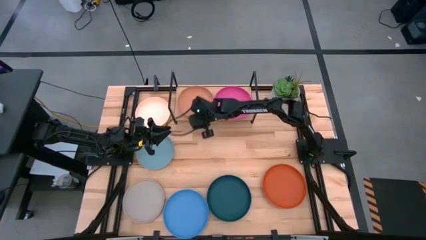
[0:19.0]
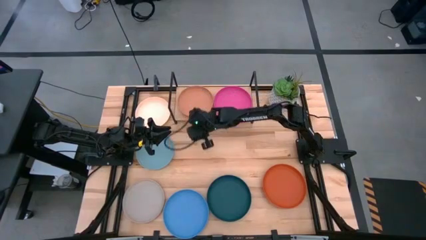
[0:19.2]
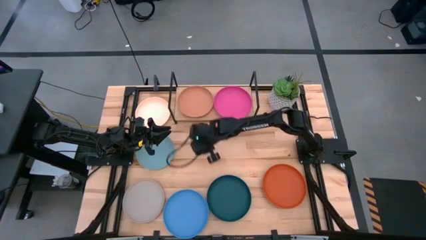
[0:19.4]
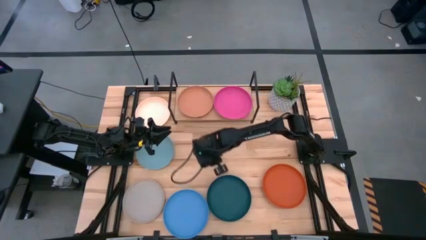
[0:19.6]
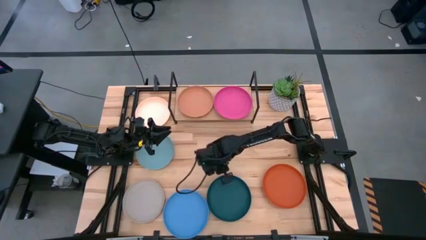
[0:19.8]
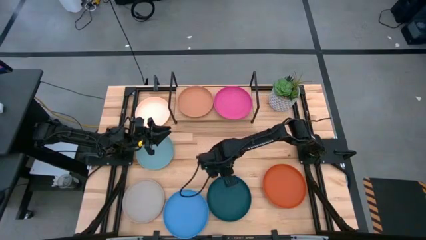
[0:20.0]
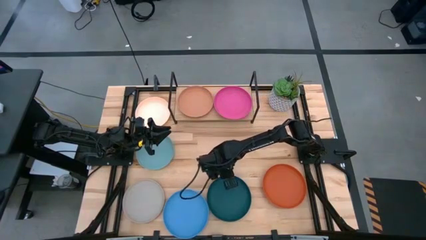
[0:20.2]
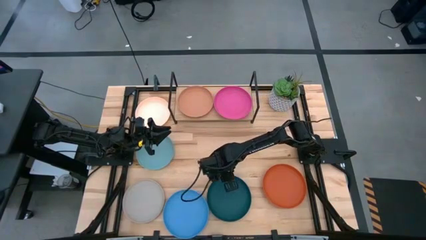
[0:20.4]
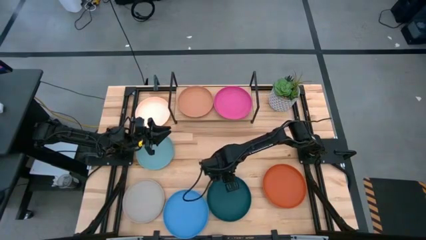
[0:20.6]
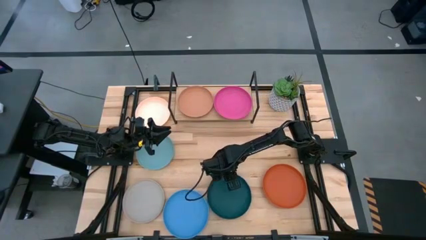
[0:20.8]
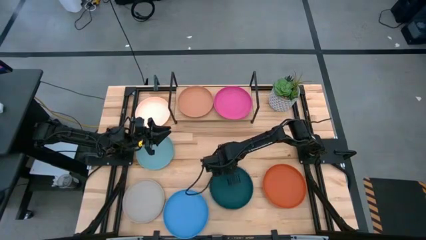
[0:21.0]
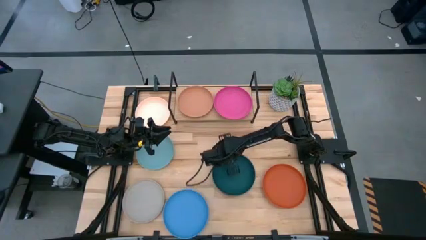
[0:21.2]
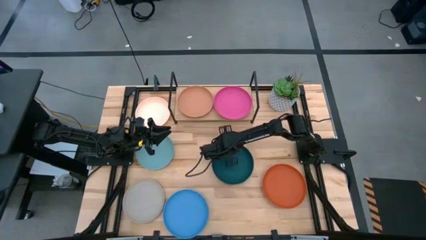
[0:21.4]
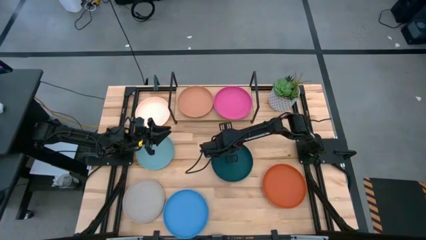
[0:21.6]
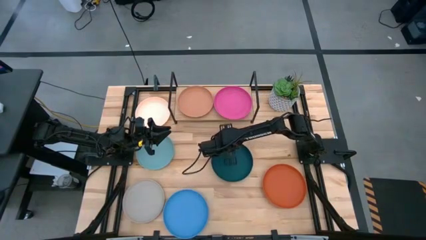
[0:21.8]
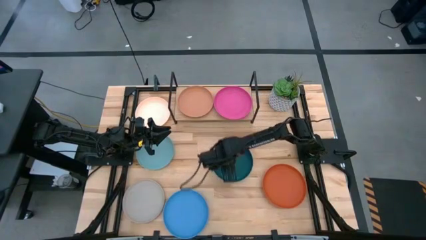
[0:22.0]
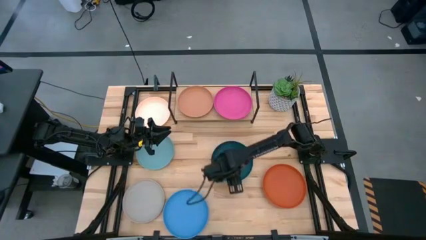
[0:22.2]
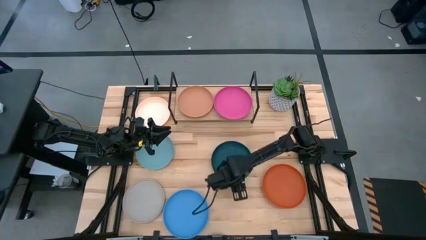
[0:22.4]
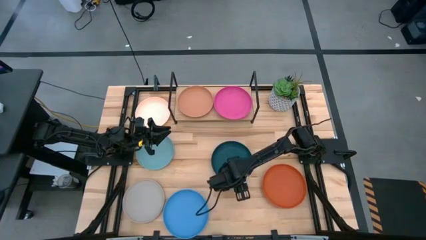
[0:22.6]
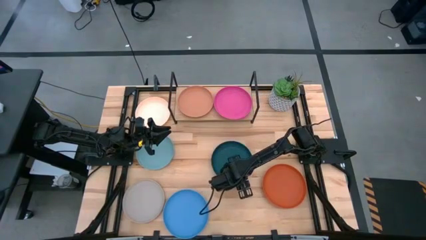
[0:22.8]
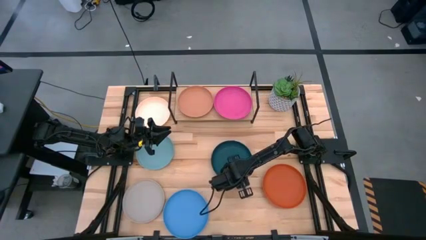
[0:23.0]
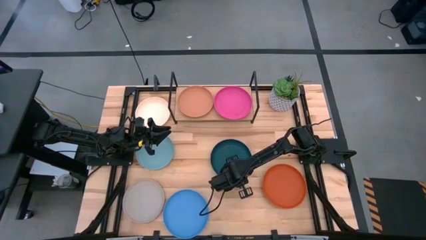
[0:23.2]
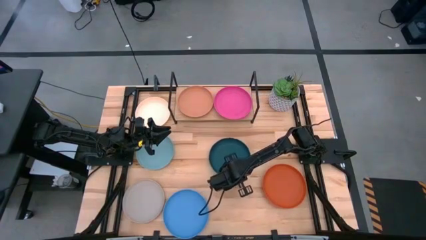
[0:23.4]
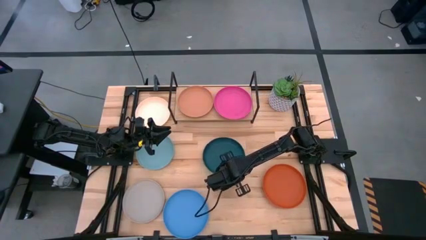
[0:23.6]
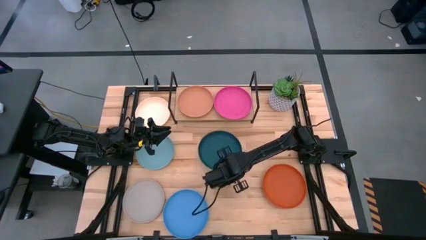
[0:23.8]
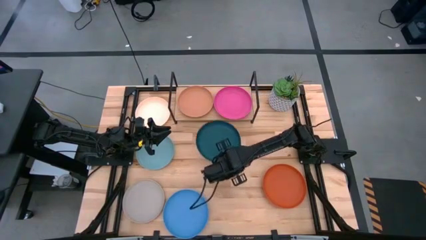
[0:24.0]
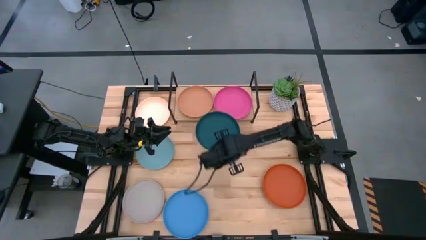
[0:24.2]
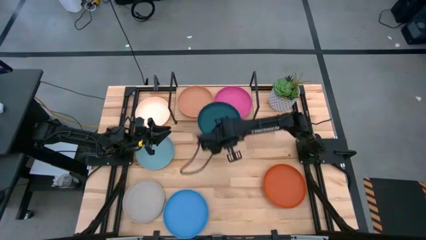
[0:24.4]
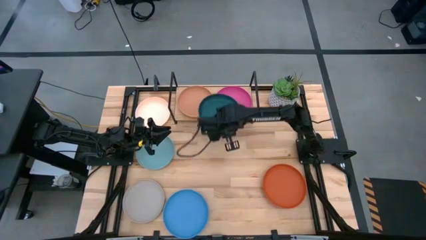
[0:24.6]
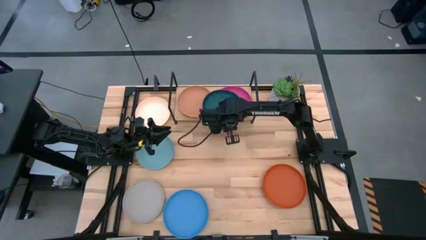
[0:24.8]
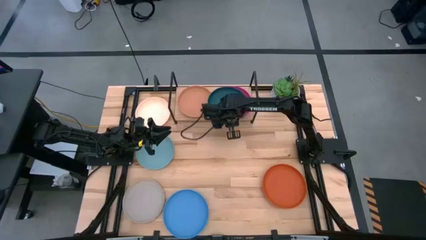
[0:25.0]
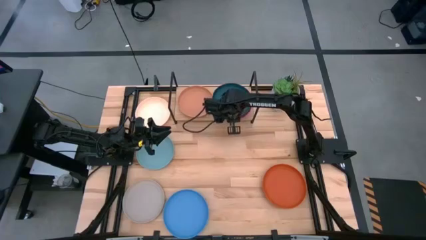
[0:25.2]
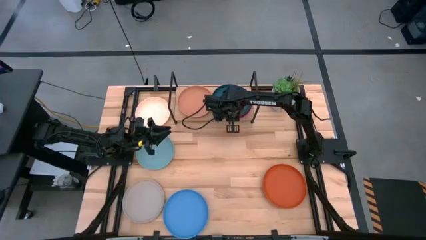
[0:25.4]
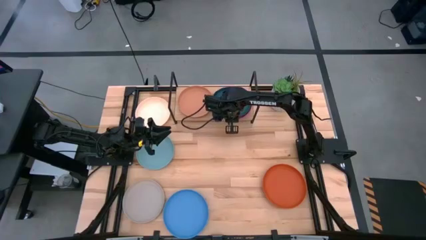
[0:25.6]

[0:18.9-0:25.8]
Task: Place and stack plates onto a shelf
Stack the dark green plate on top of the pink plate on the shelf

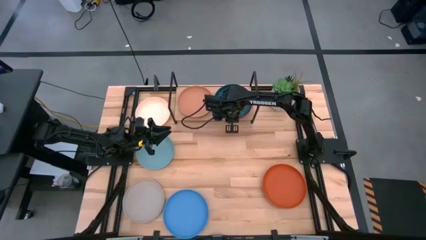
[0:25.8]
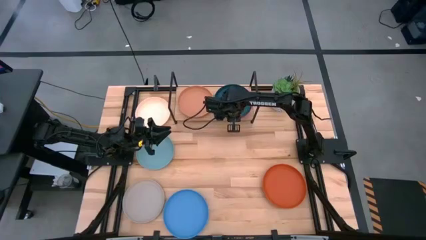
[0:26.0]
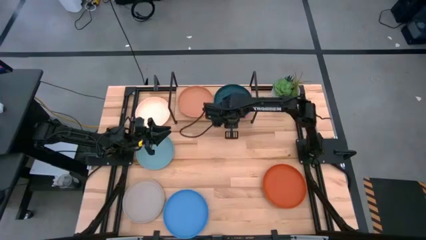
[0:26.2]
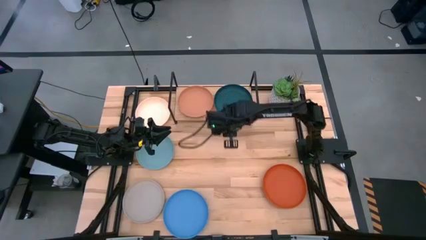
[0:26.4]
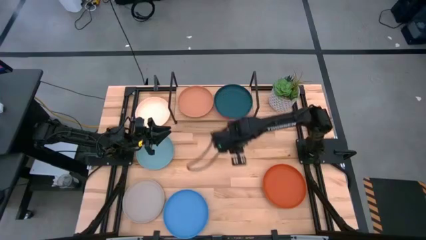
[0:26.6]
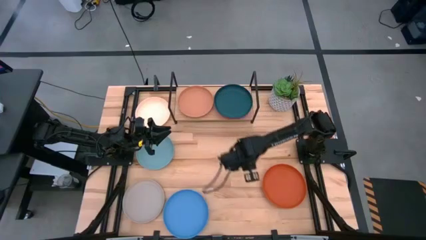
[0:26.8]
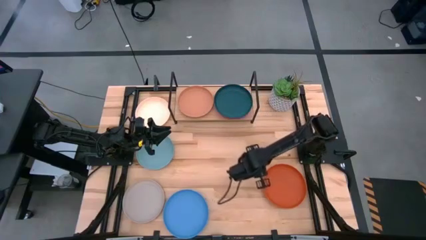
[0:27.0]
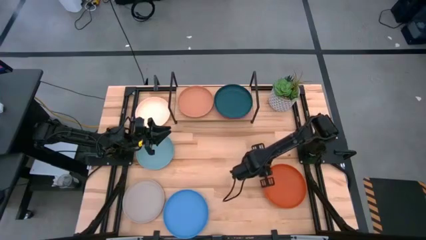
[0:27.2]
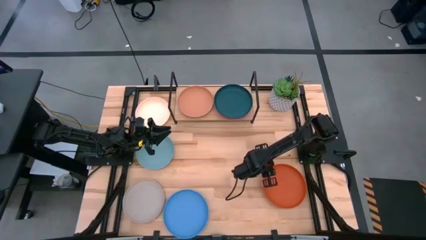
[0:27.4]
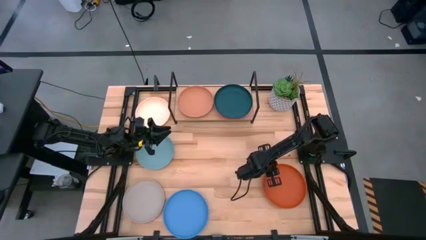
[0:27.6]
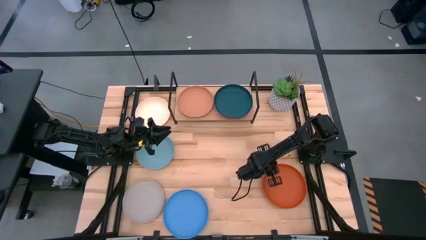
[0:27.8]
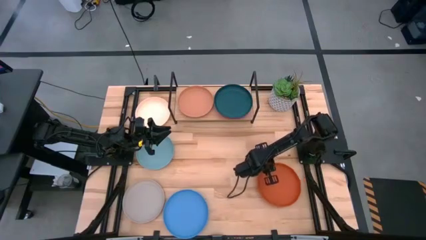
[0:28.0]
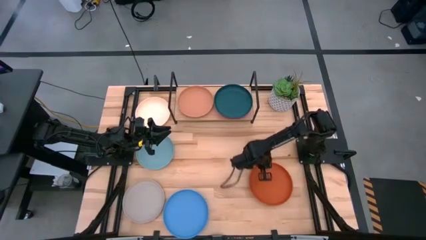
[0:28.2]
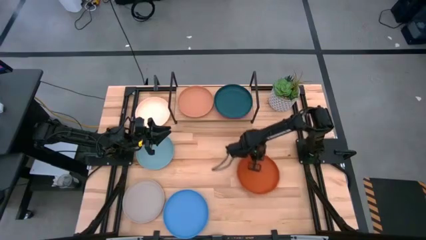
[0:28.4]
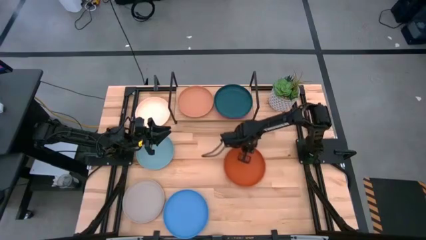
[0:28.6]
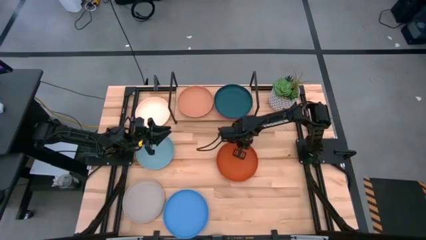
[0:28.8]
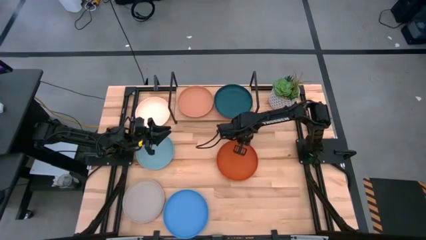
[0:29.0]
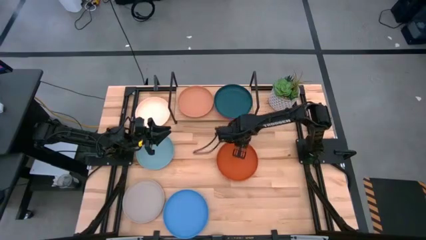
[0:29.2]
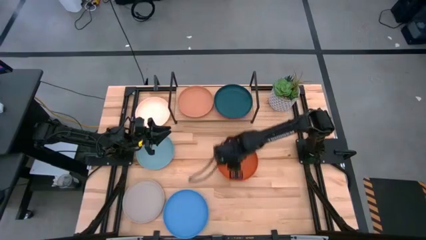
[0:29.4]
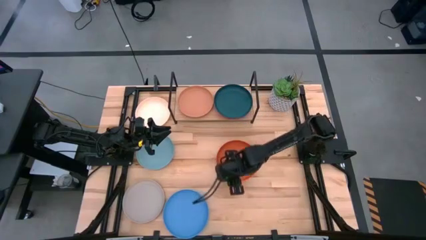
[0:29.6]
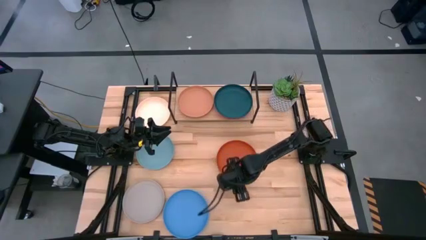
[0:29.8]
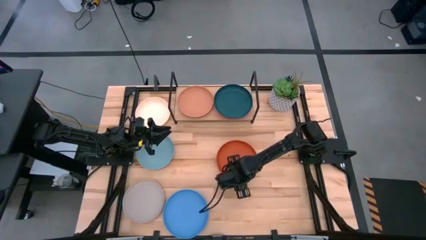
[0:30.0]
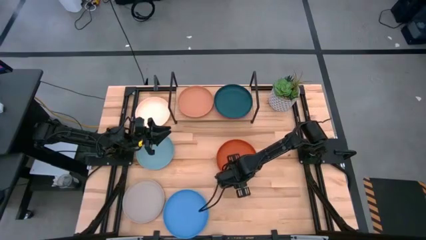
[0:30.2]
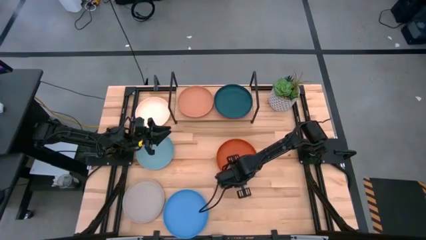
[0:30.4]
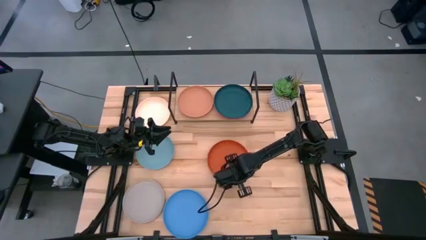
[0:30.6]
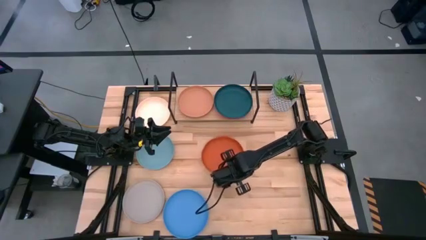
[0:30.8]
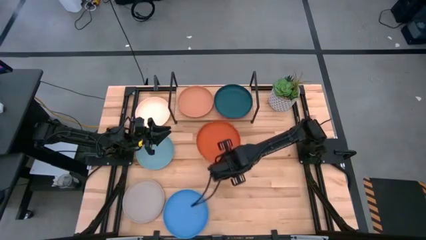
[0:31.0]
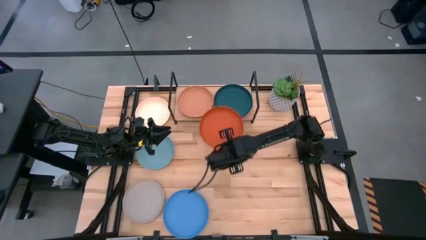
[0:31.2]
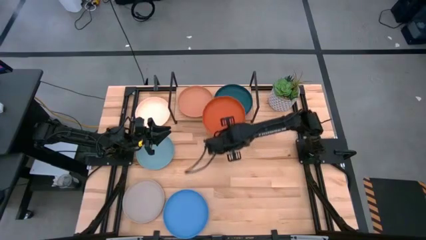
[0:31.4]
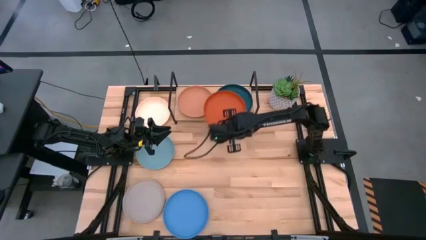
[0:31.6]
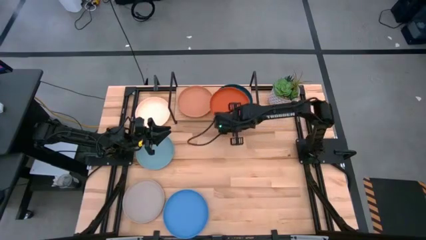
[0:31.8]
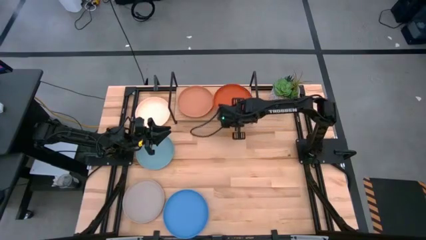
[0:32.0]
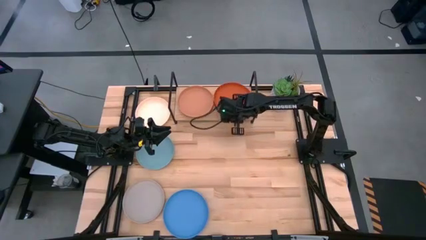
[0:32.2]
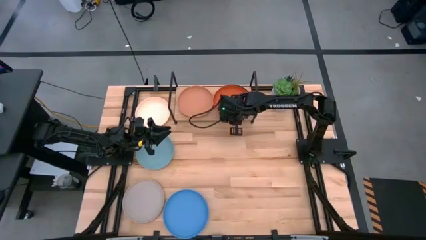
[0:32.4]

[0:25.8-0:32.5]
Stack the orange plate on top of the dark green plate on the shelf

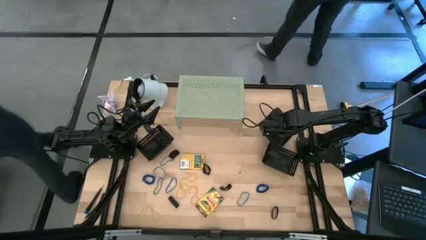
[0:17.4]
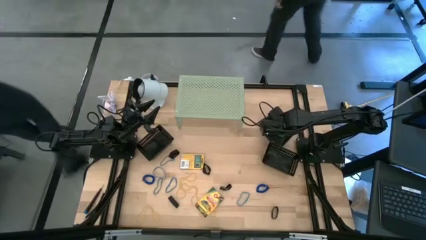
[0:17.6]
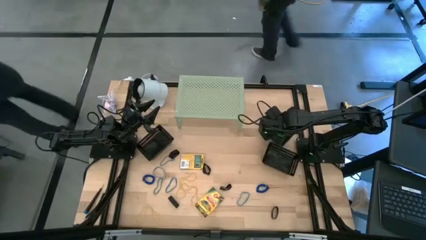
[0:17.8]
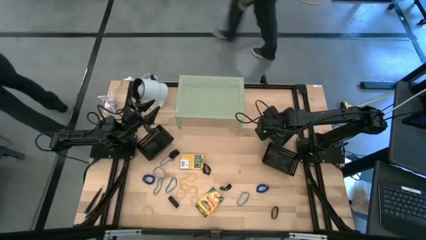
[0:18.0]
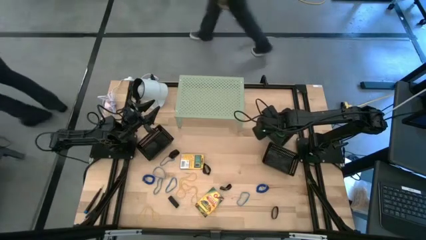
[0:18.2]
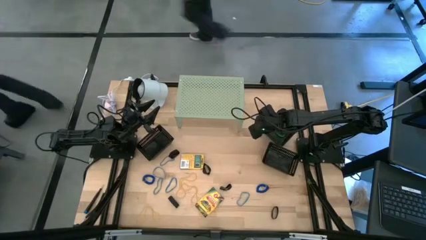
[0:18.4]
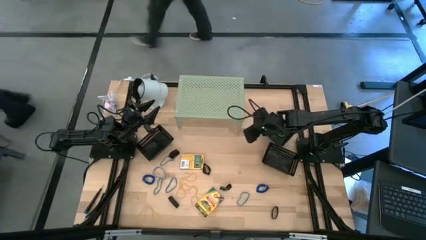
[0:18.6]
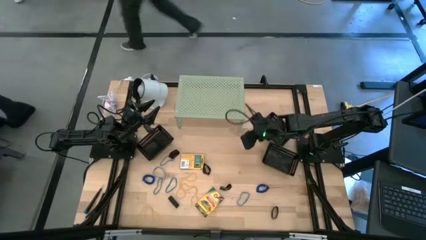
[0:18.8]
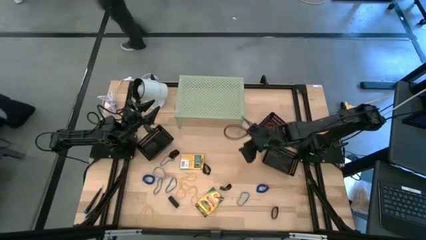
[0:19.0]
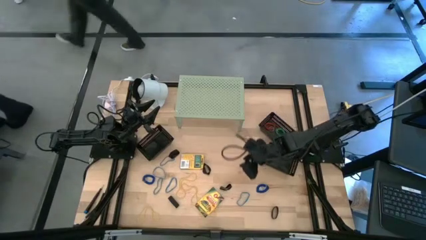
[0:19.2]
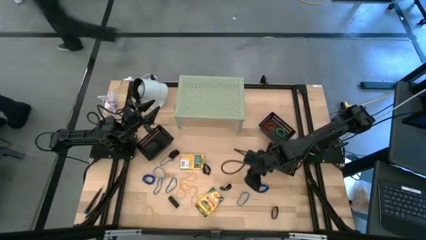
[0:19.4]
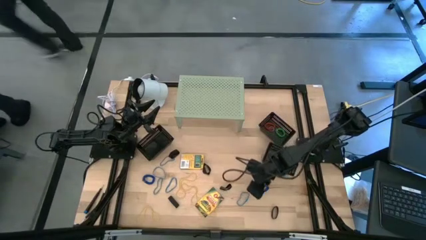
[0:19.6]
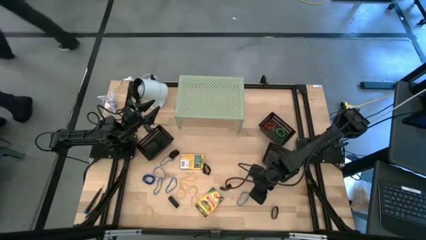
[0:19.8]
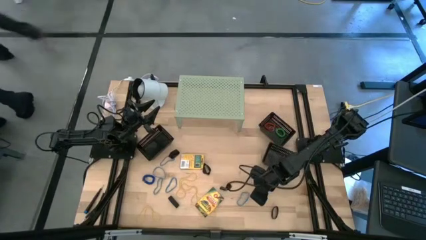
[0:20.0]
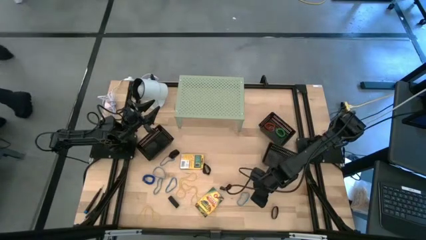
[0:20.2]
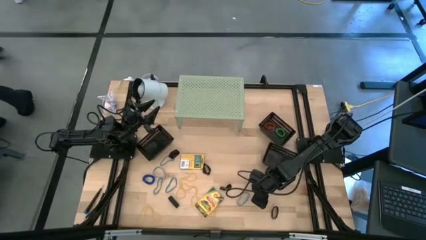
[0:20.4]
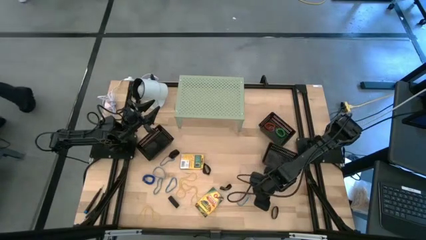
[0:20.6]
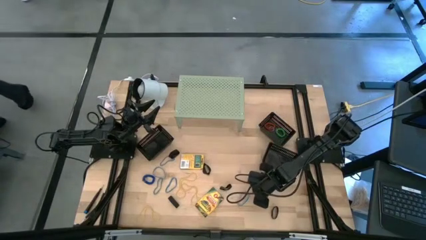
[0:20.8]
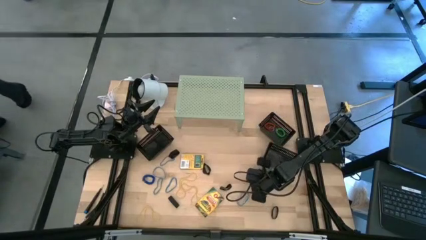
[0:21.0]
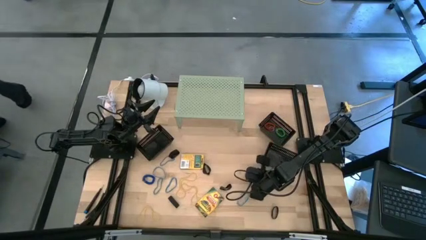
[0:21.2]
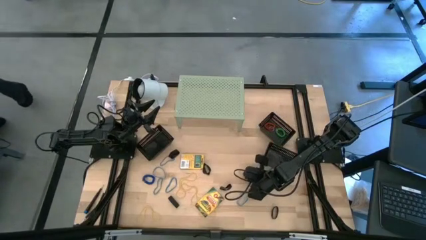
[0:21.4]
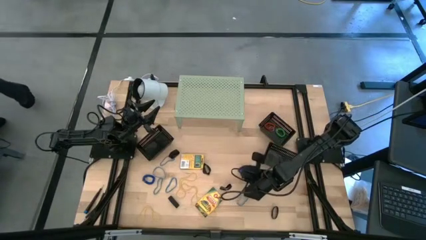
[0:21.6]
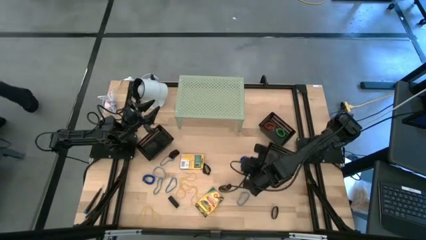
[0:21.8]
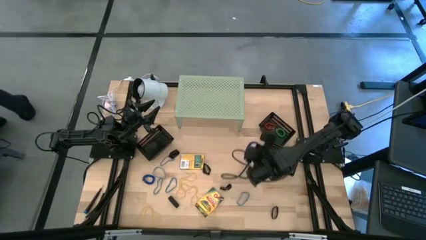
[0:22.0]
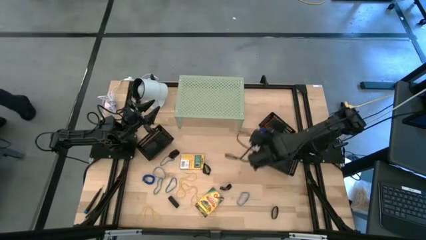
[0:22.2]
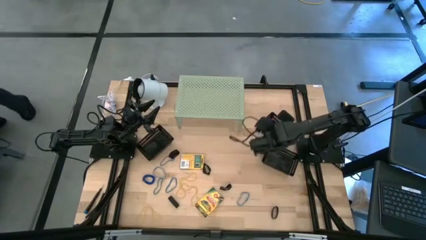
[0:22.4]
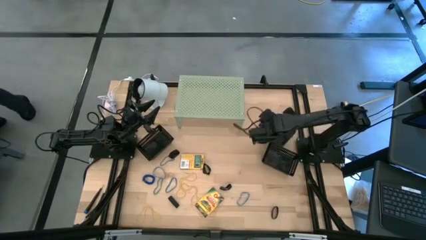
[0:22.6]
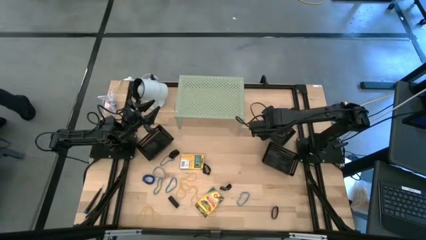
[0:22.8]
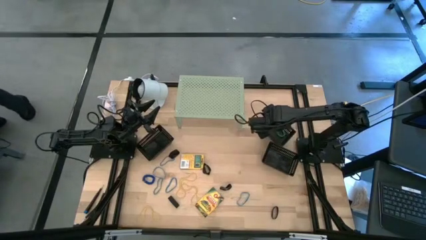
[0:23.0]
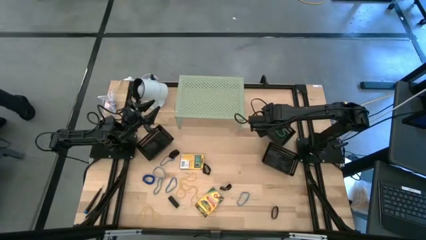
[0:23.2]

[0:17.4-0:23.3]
Task: Pick & Place Office Desk Supplies
Put the blue spring keychain into the top black bin
